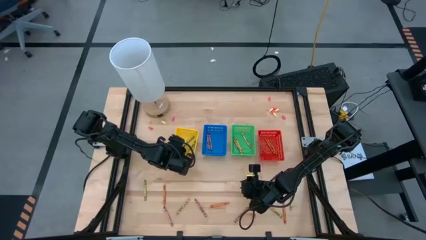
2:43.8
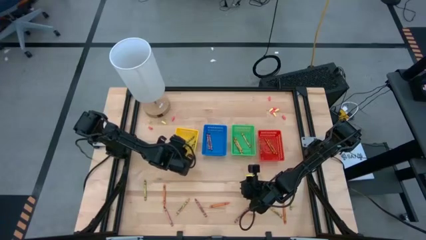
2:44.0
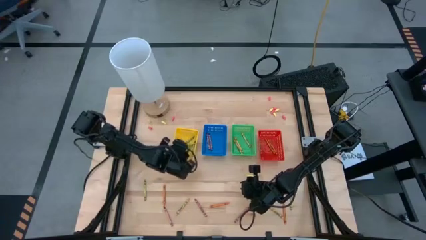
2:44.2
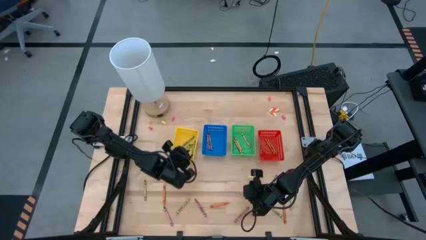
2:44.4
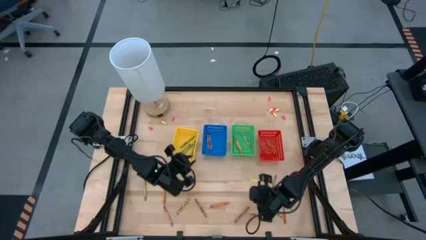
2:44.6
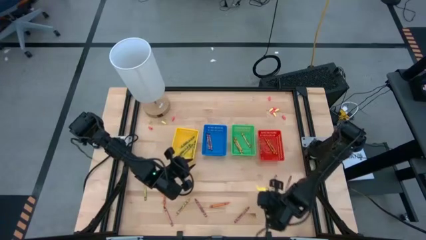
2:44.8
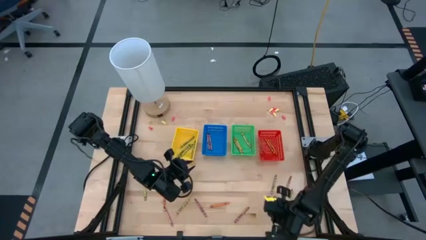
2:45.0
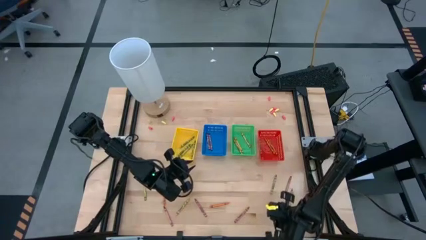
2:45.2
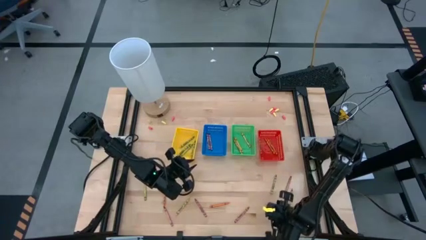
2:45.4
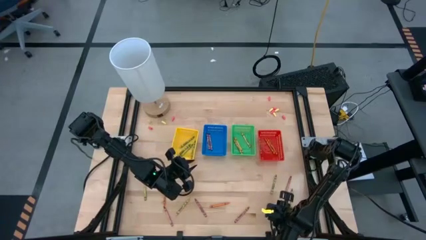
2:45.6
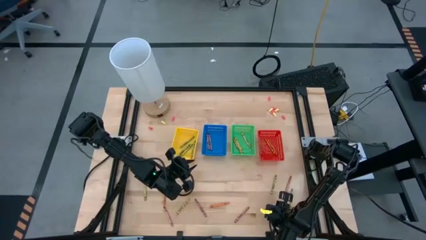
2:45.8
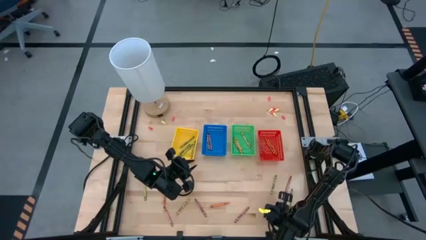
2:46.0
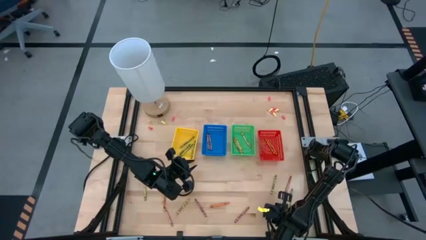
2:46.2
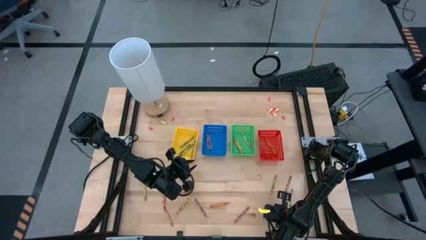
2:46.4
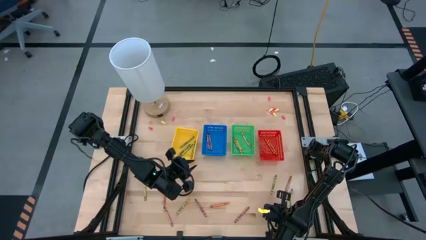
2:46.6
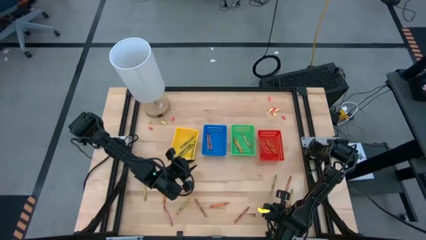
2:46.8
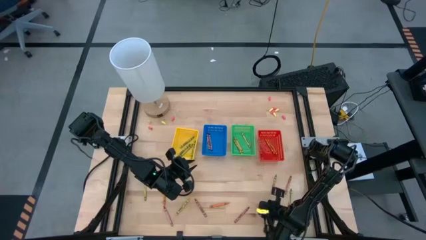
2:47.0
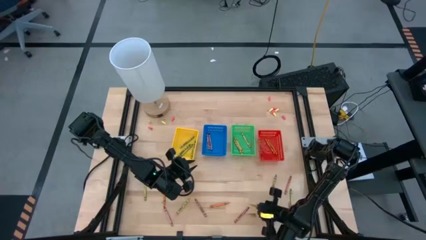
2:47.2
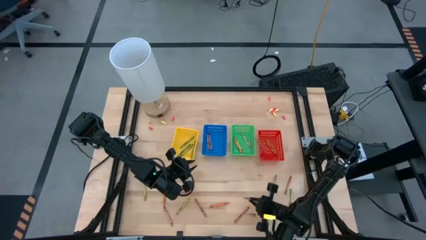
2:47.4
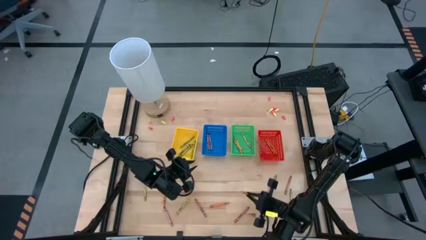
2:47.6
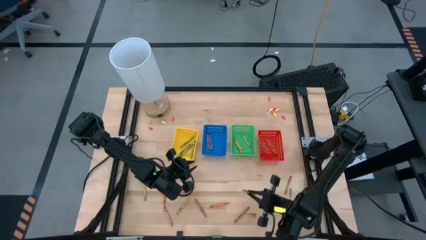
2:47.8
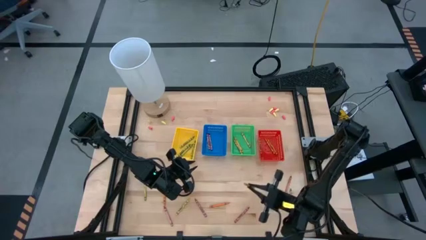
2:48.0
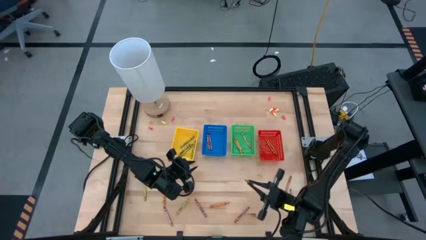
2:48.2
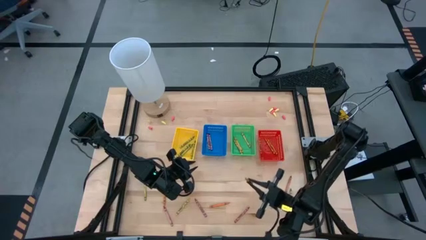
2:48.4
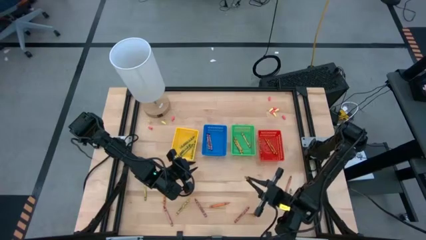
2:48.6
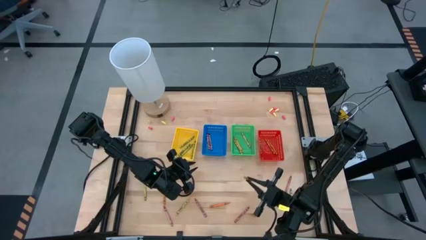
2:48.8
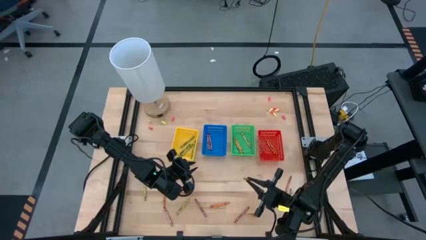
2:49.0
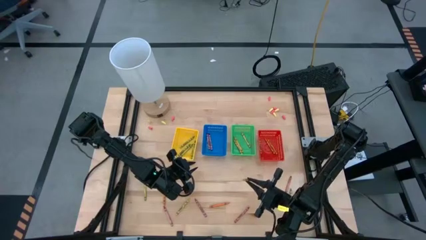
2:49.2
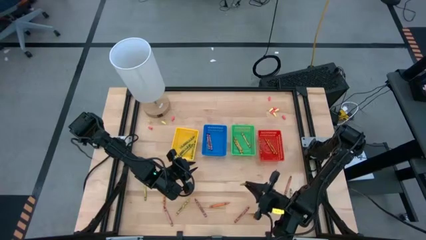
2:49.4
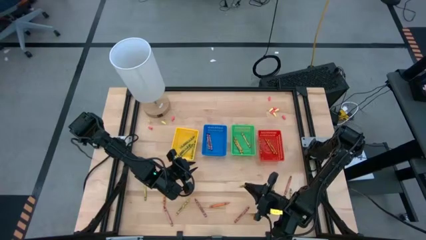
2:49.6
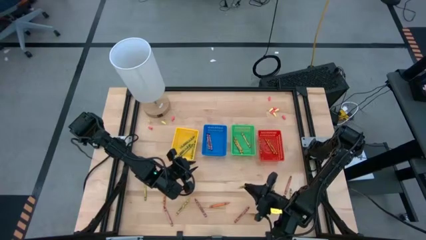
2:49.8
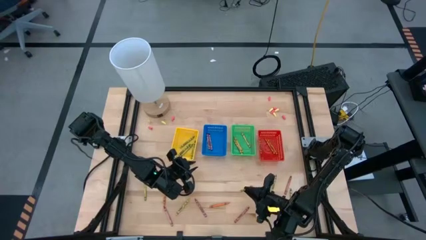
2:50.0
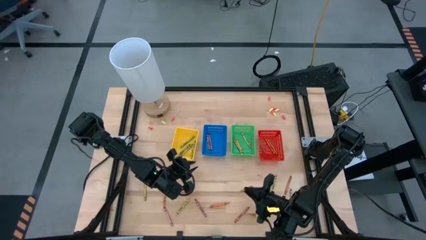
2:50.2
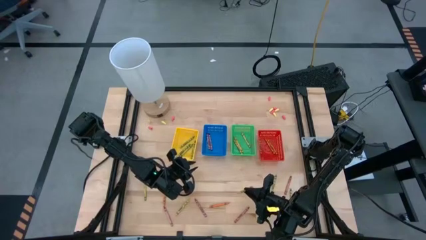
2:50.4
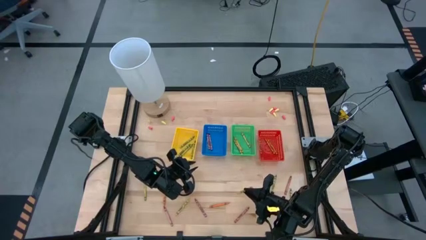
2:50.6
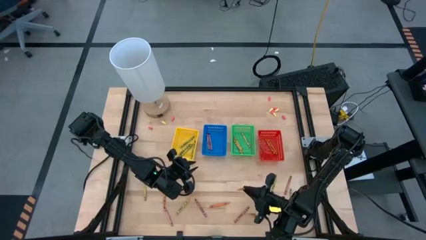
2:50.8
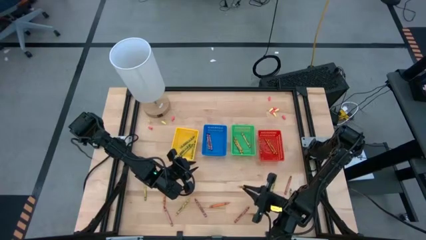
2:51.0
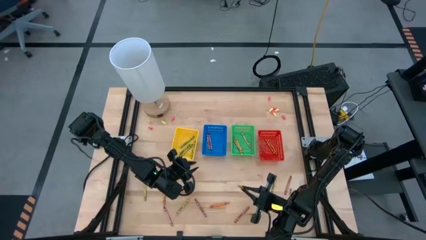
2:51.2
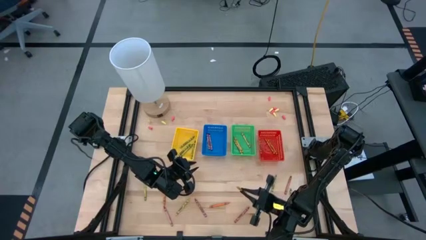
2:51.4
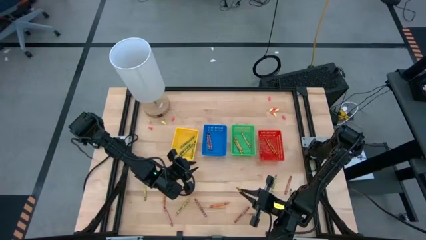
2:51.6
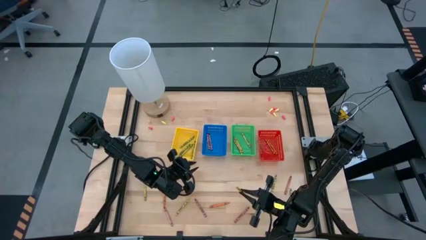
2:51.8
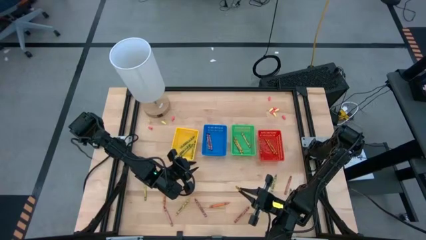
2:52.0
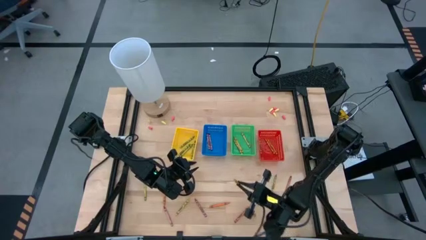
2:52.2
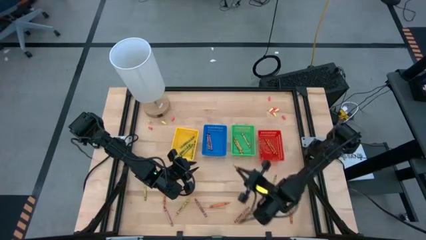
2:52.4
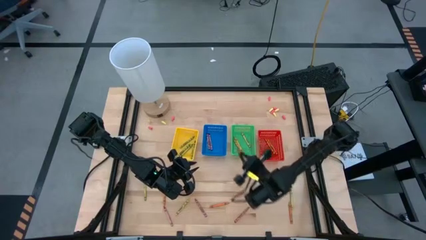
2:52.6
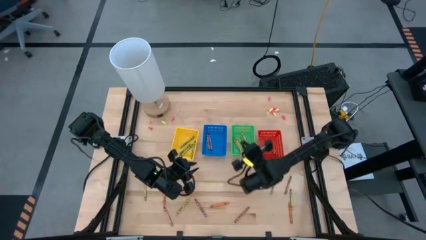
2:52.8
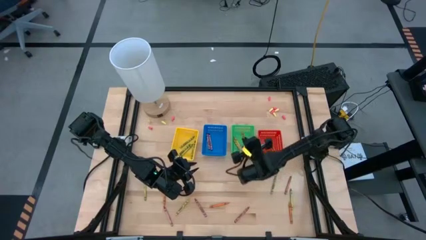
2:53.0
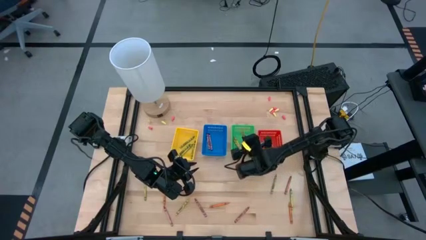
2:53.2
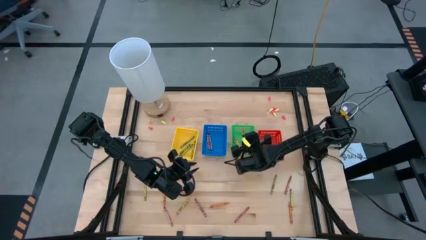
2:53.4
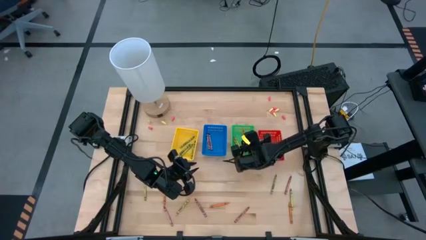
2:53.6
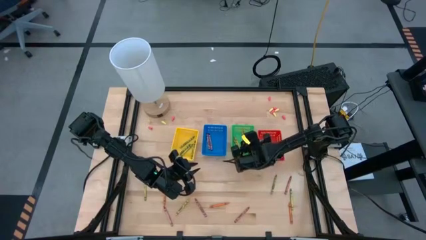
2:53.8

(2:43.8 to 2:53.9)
Task: Sort crayons
Put the yellow crayon into the green bin

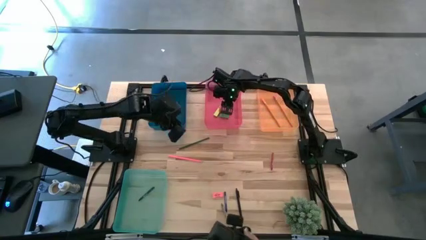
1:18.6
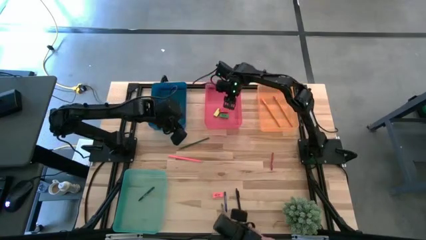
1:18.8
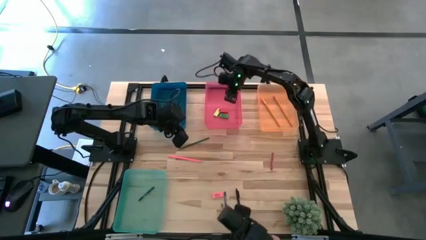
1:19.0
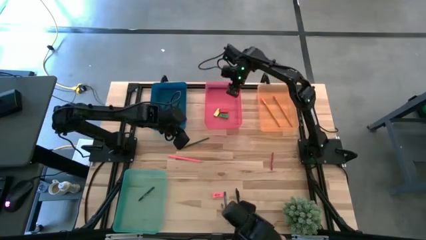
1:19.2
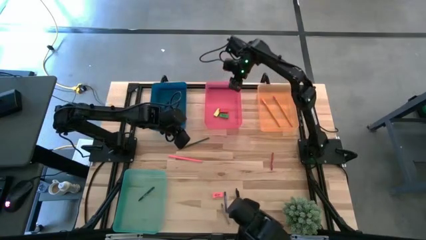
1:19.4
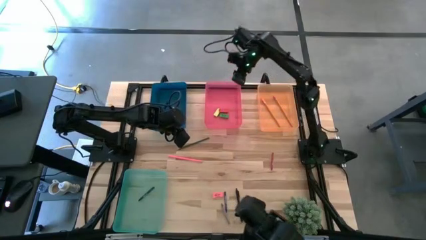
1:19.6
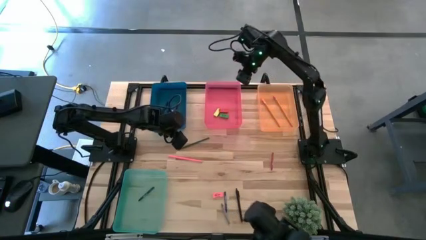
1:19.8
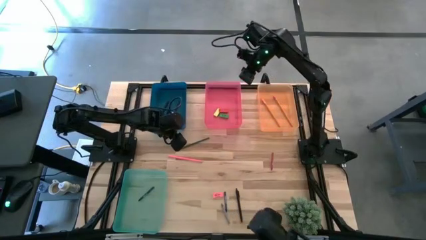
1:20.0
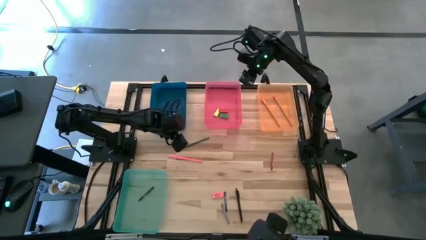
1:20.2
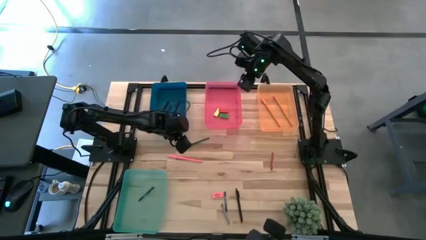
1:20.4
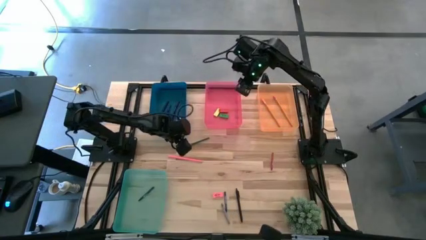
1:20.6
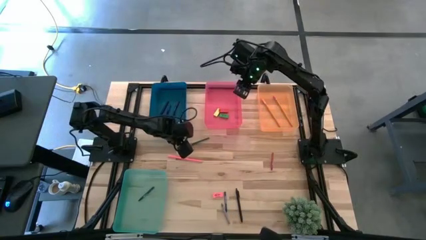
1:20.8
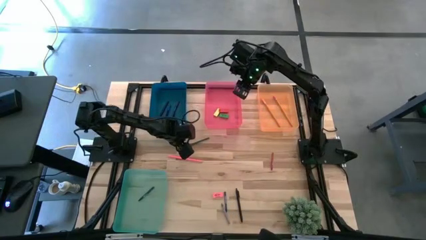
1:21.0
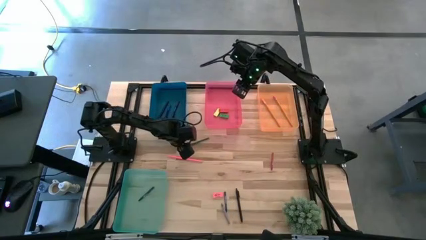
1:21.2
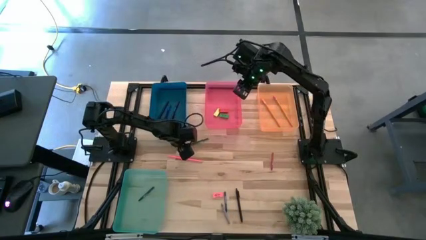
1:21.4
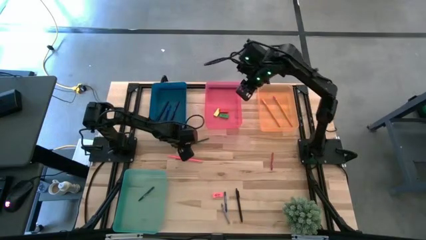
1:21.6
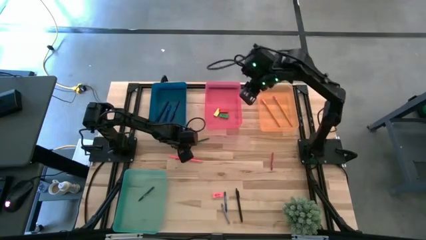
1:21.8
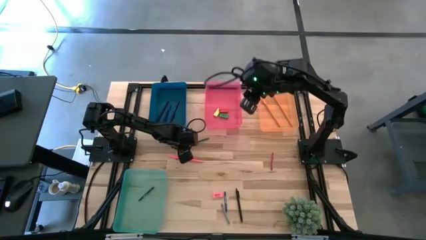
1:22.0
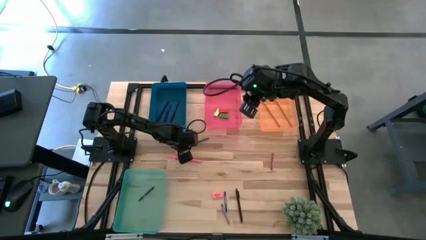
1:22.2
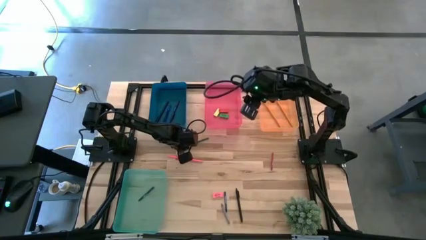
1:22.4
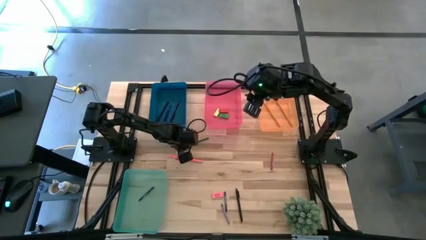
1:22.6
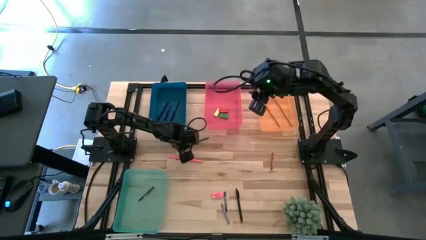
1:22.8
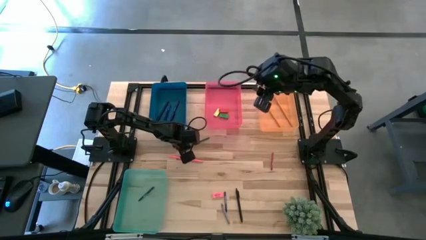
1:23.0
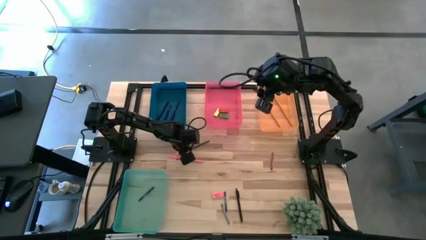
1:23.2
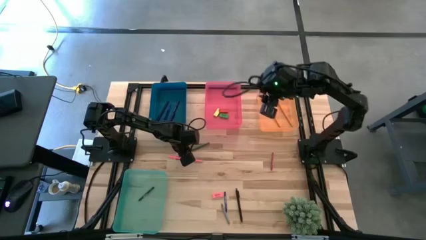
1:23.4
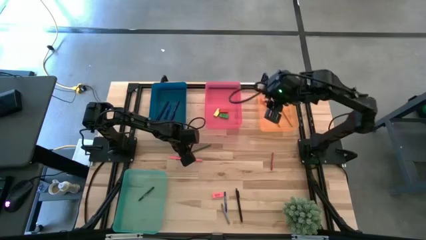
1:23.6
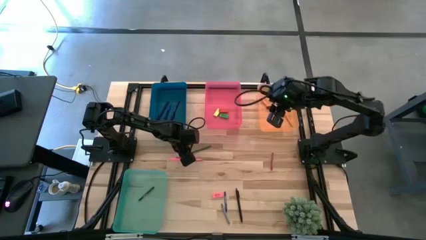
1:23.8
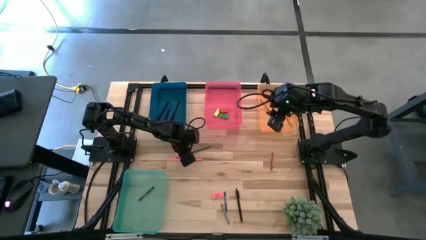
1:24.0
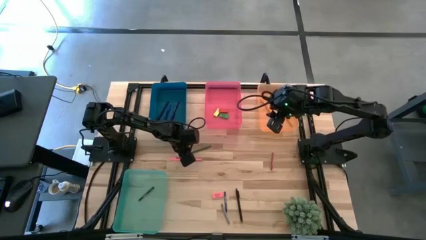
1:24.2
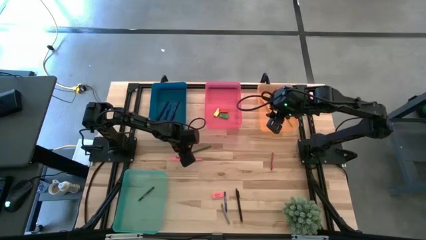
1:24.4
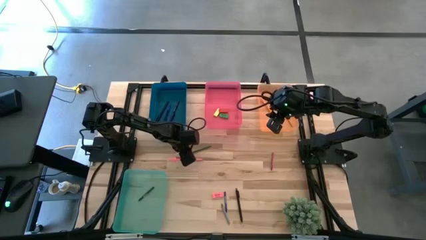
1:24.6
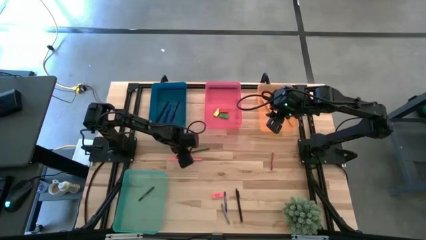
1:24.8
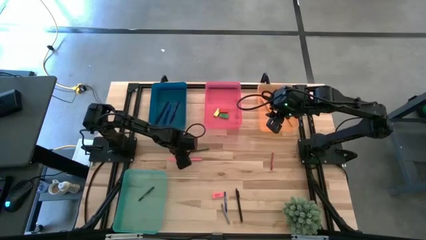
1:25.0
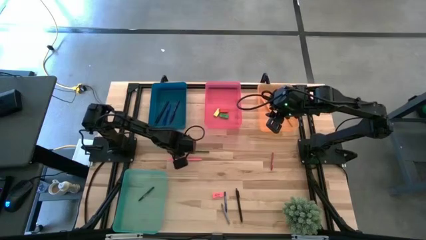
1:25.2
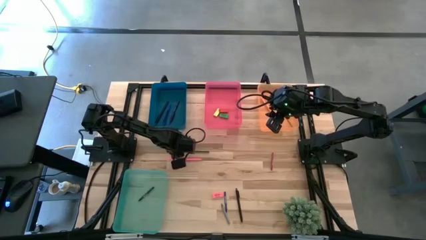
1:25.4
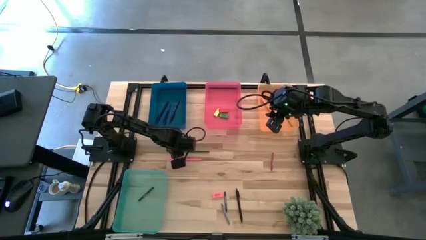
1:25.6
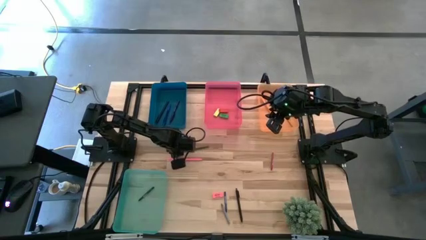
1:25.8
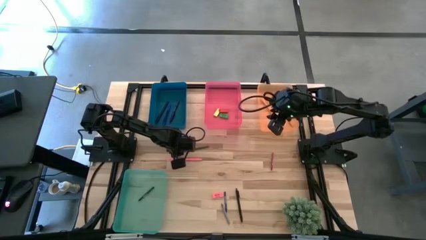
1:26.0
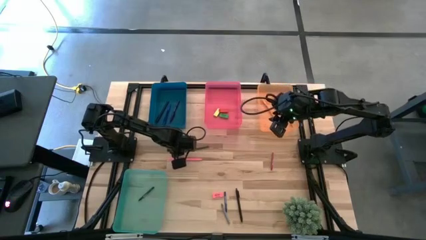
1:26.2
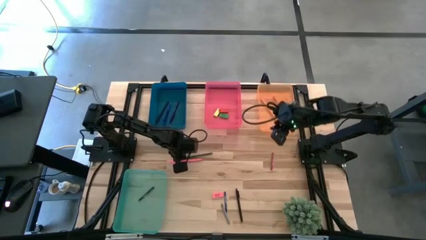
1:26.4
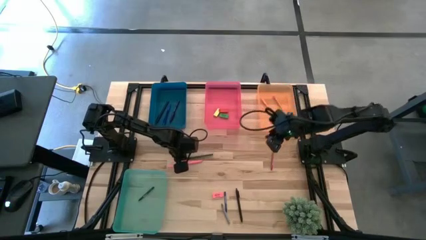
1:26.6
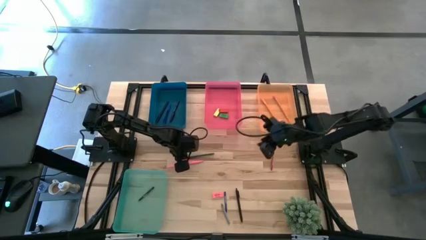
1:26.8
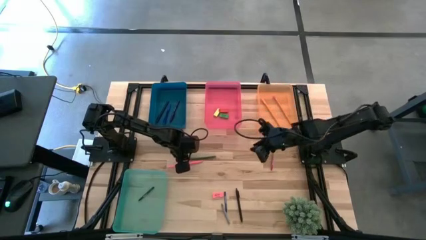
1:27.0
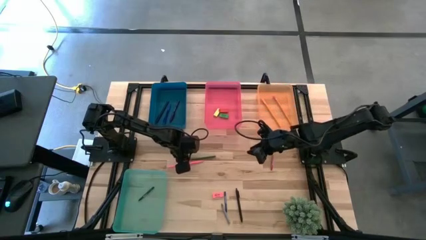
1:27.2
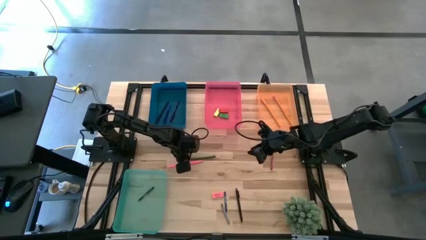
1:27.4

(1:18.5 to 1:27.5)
Task: Sort crayons/erasers/pens/pencils in bins
Put the green pencil into the orange bin
